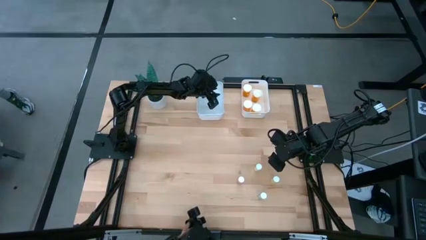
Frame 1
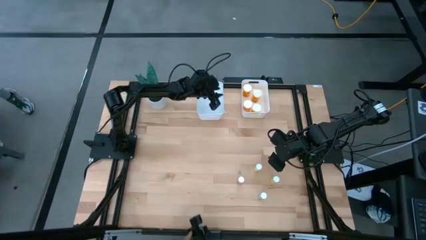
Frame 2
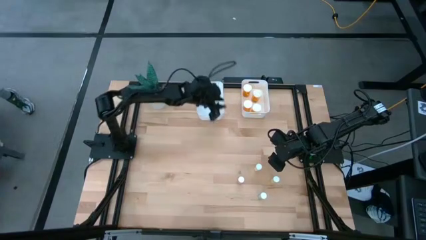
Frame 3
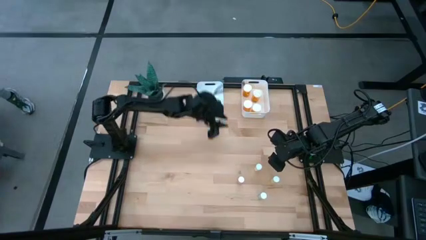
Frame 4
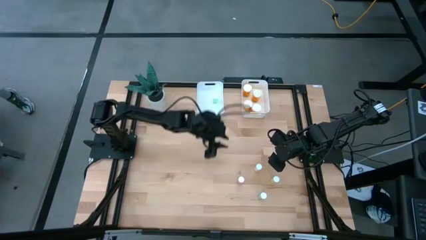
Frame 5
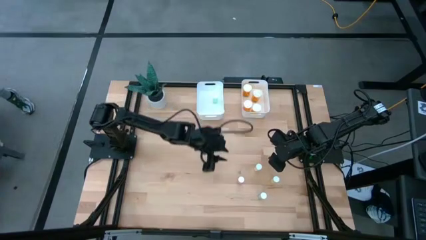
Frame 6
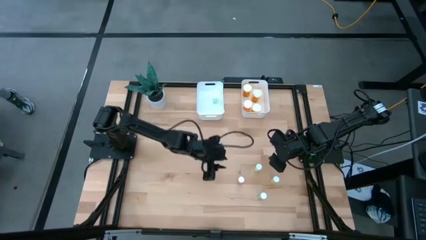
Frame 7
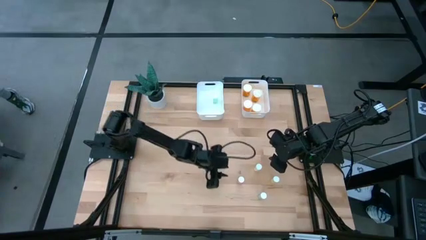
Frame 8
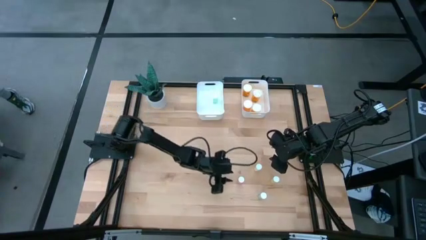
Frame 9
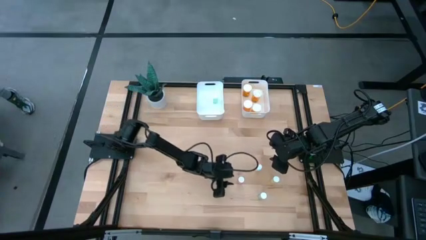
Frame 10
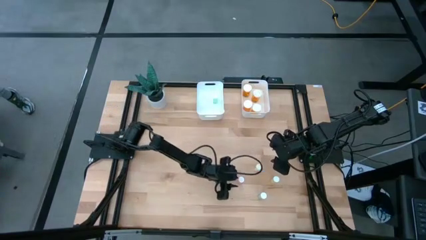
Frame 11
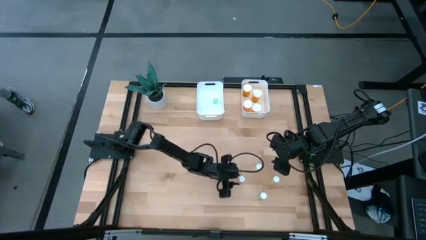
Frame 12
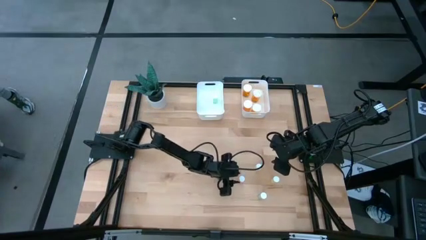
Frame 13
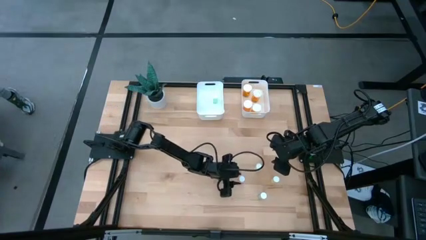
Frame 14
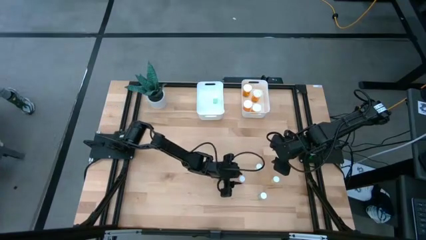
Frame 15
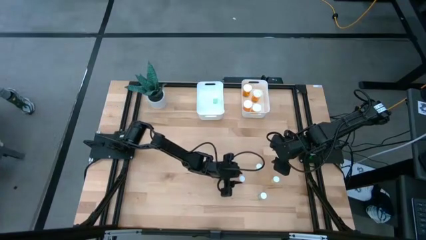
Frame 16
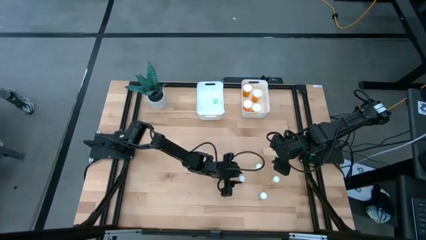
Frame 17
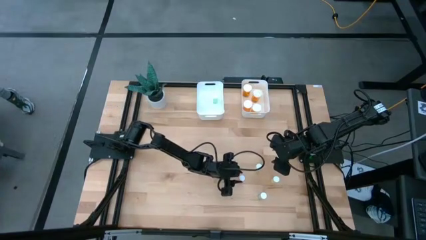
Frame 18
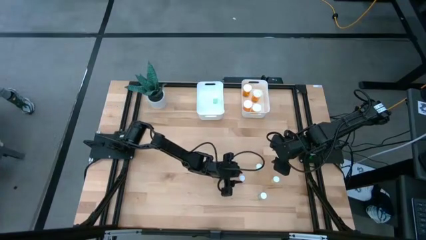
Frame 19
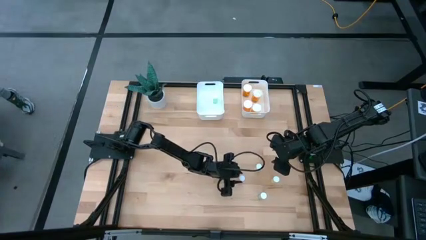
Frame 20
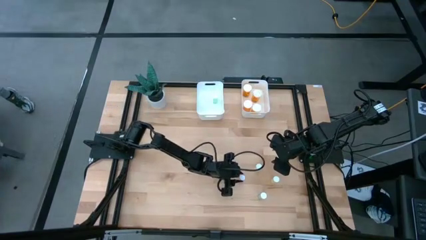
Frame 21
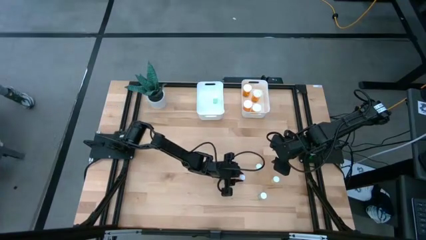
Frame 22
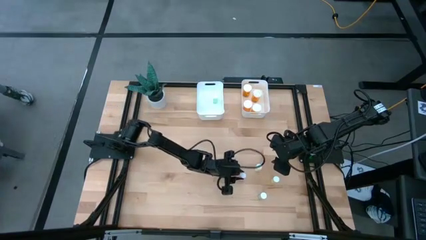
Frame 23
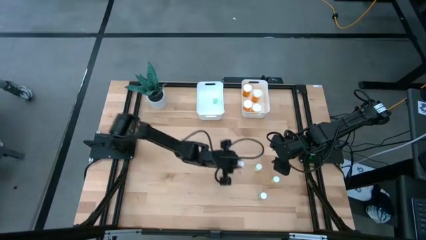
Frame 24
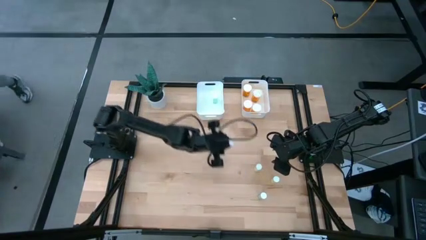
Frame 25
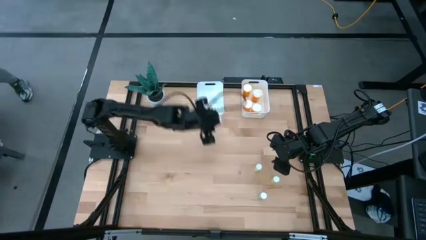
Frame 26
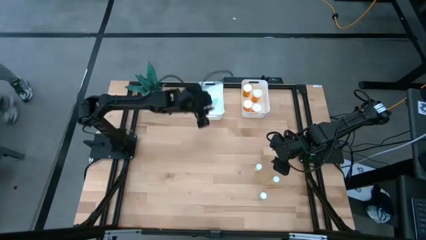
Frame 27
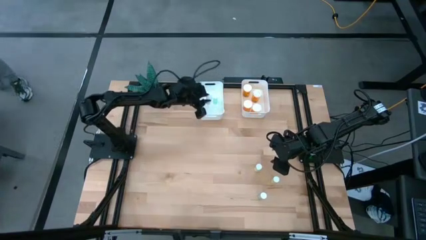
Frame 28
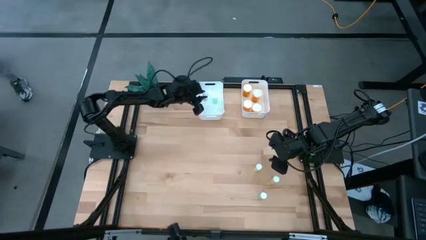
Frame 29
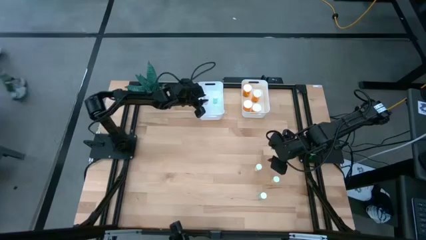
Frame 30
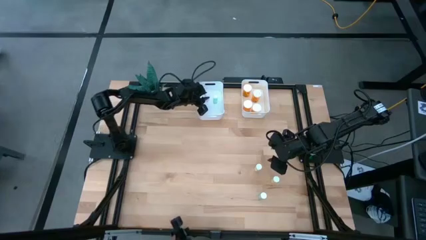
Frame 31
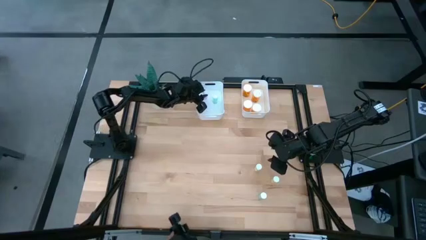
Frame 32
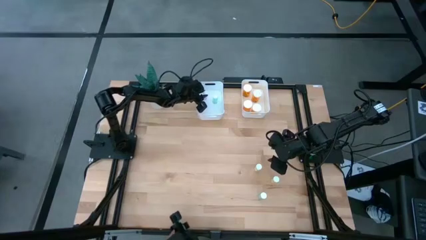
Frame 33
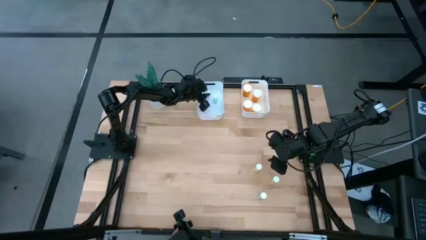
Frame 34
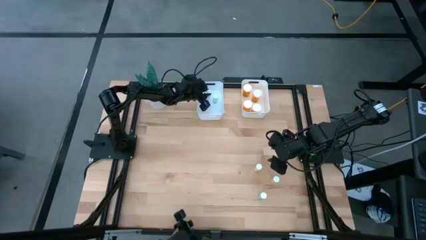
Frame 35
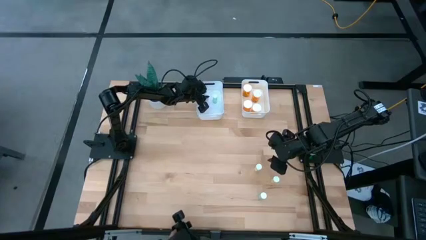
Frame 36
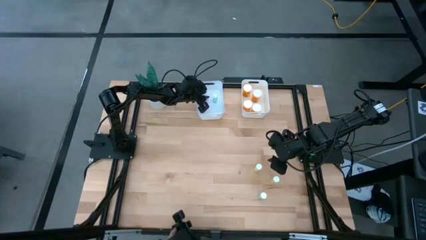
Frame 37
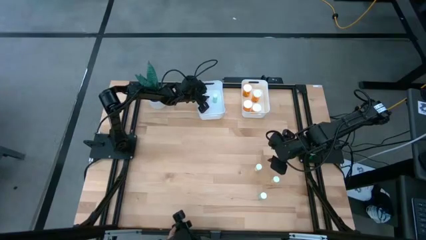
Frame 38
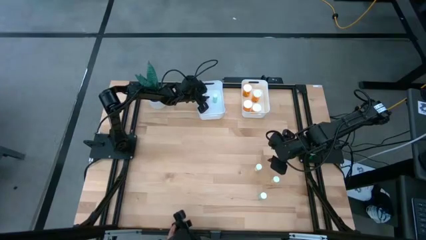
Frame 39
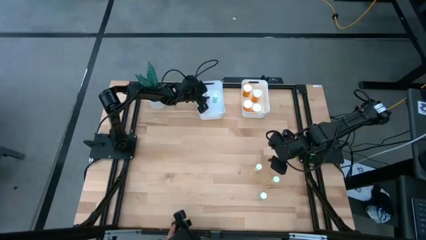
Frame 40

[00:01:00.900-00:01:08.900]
Task: Pick and place medicine bottles into bin by pill shape (circle, oval)
Put the small pink tablet bottle into the left white bin

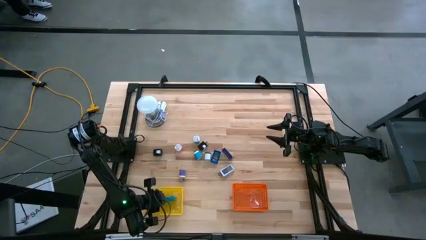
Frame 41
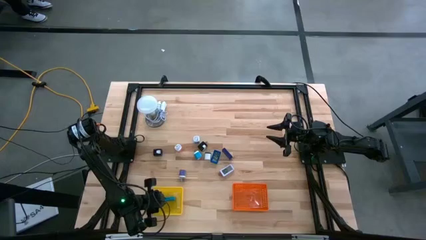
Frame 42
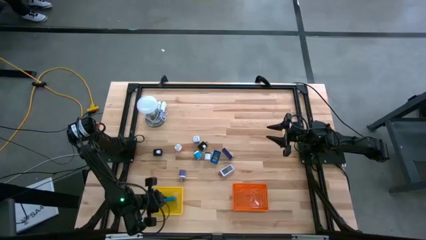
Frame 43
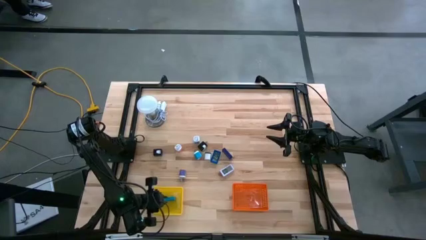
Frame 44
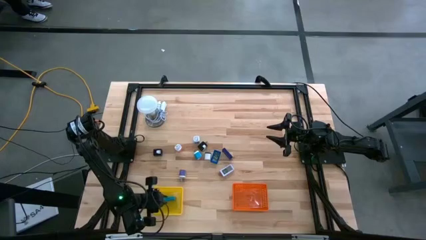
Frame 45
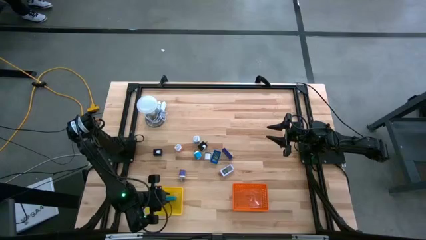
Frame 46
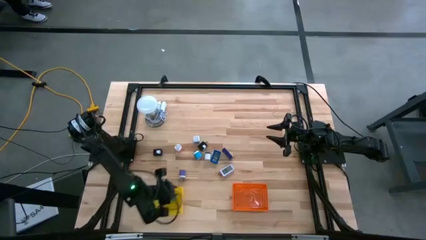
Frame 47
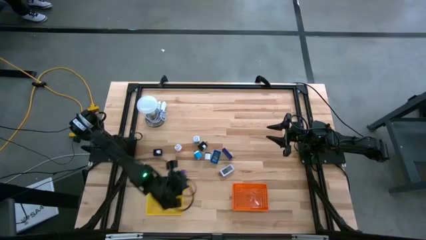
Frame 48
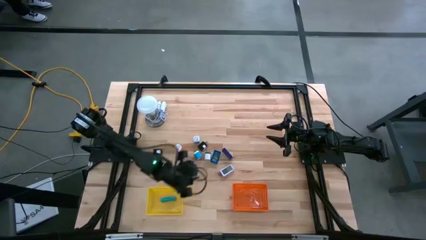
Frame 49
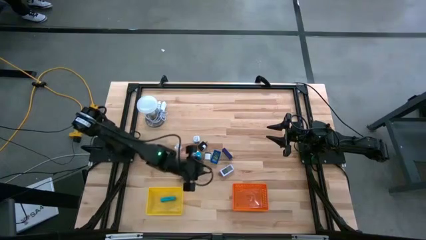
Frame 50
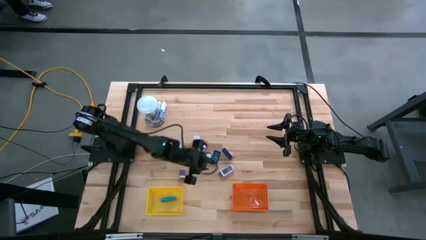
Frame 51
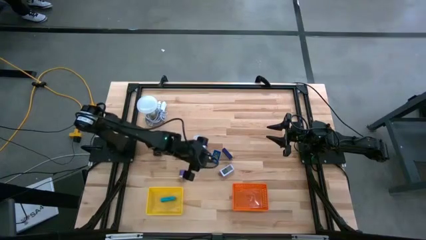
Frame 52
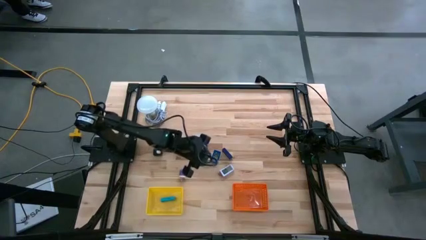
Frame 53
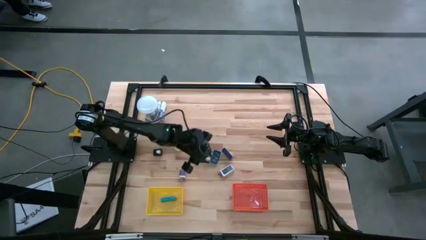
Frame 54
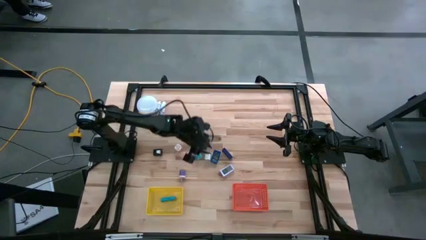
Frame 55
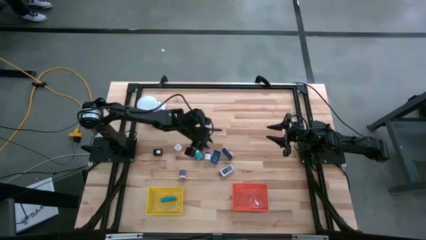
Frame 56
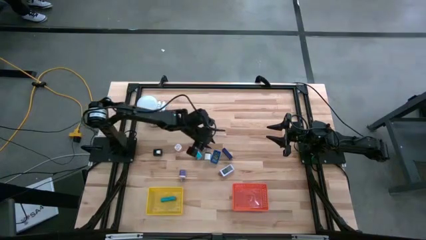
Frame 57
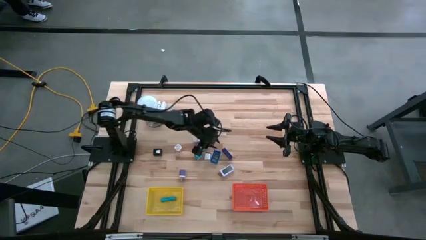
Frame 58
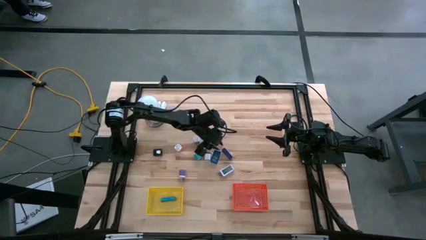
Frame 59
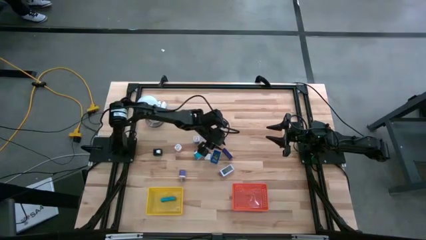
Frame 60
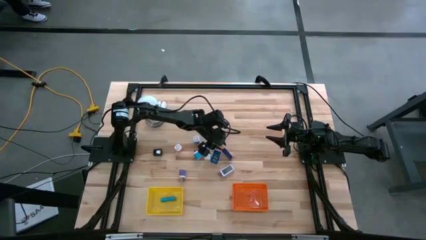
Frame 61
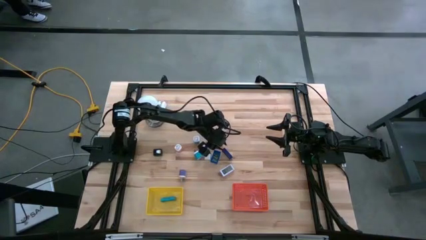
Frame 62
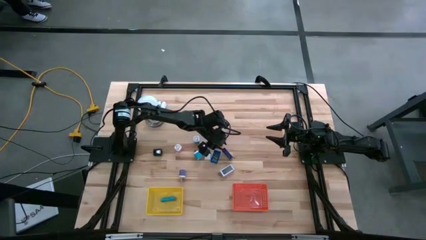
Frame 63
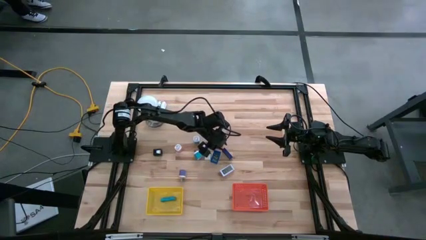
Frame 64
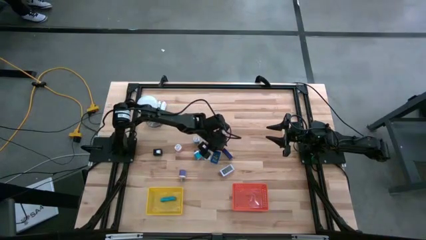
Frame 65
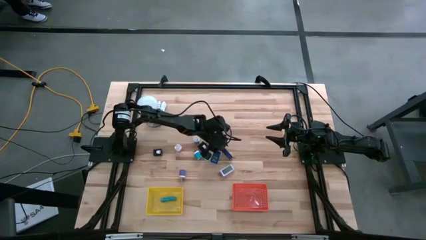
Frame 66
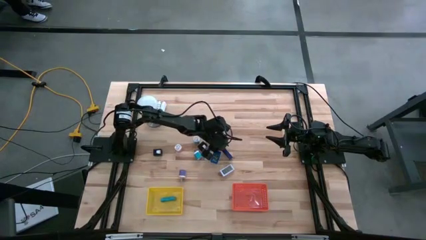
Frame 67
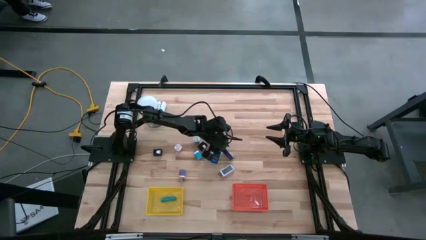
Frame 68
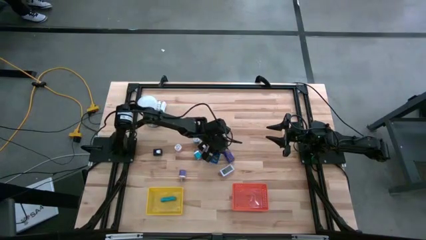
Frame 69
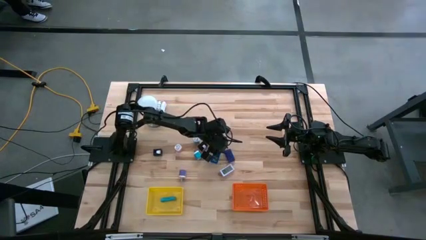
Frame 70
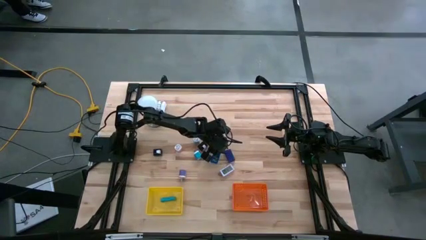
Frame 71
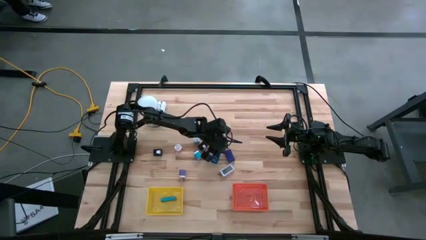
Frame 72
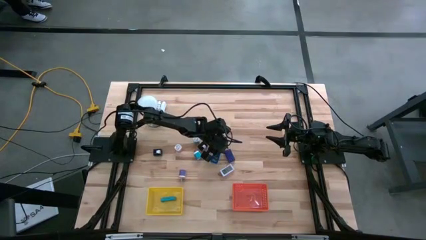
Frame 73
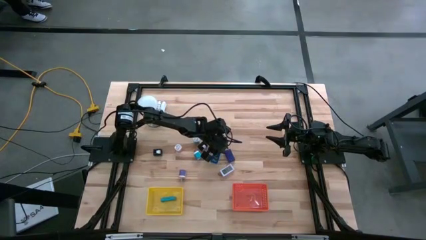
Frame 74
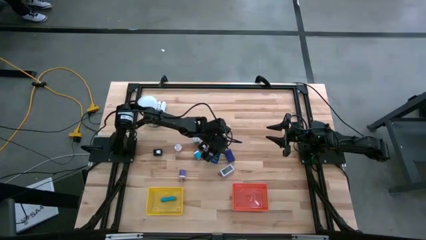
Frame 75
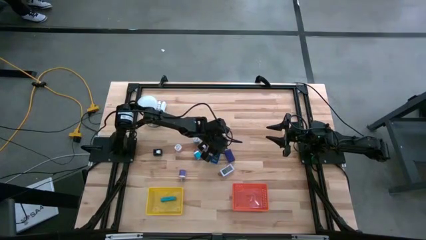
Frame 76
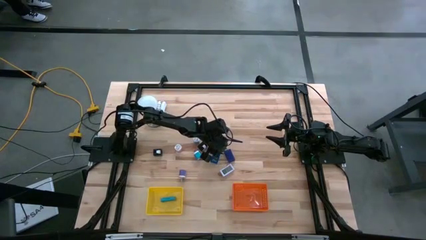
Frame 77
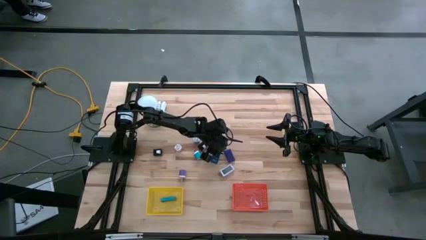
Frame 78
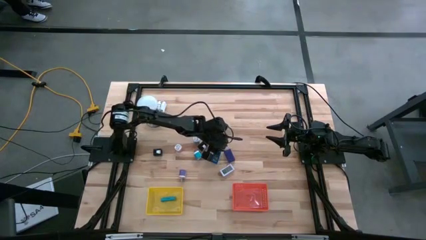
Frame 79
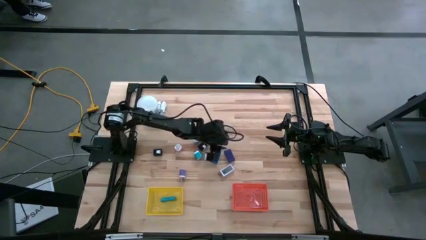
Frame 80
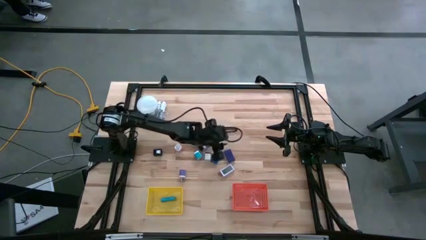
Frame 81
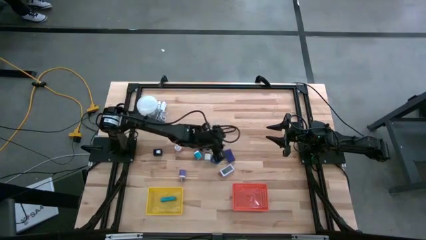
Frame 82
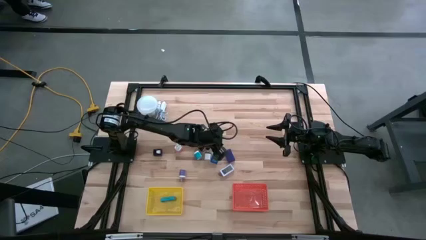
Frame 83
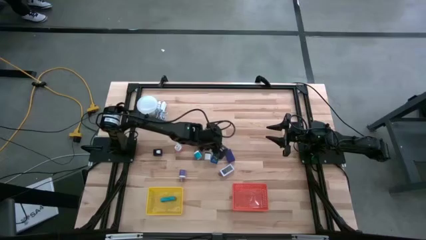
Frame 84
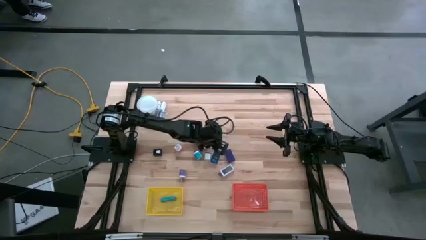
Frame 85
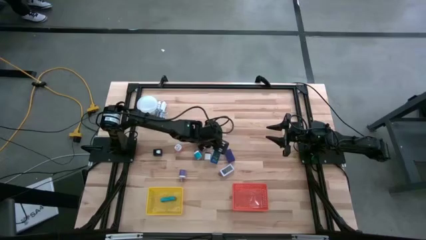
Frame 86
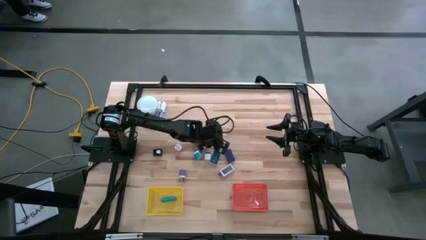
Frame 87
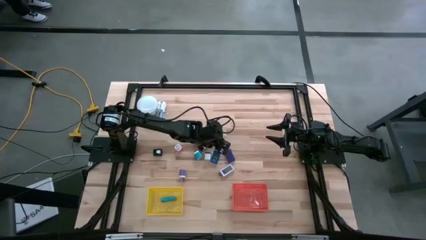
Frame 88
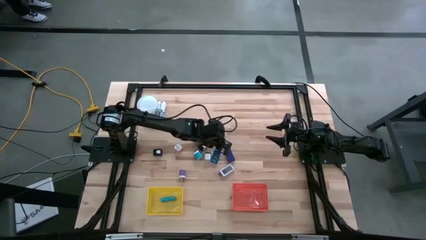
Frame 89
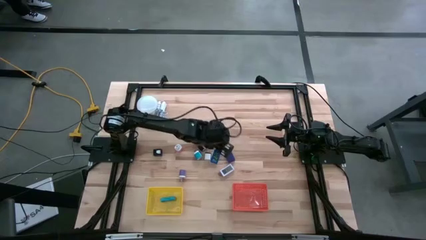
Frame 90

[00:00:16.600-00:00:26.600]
Task: Pick & Place Office items
Put the dark blue digital clock into the yellow bin
